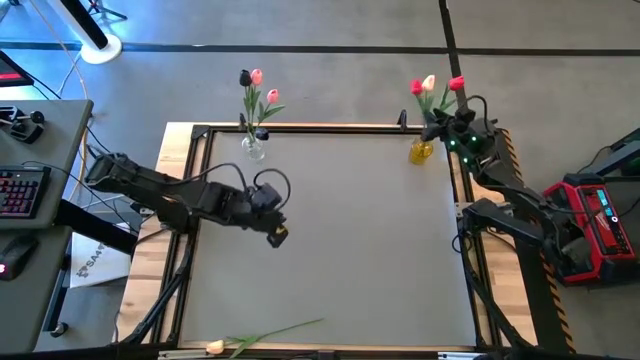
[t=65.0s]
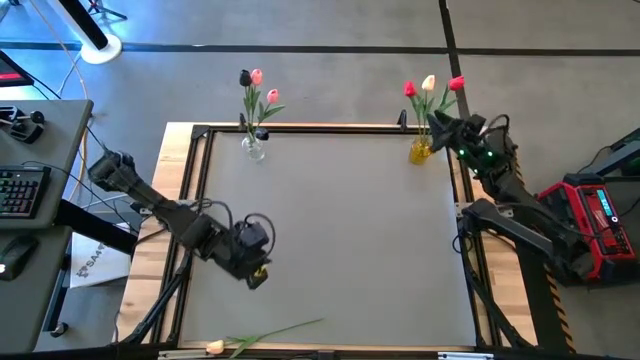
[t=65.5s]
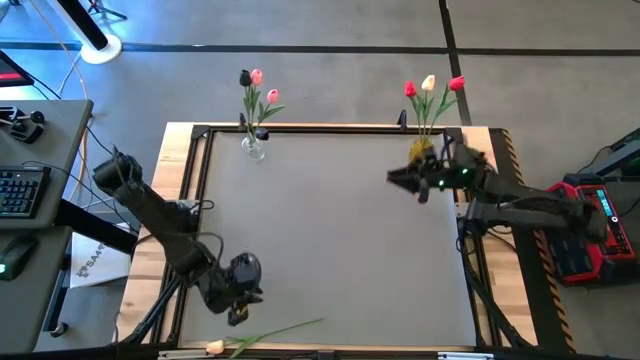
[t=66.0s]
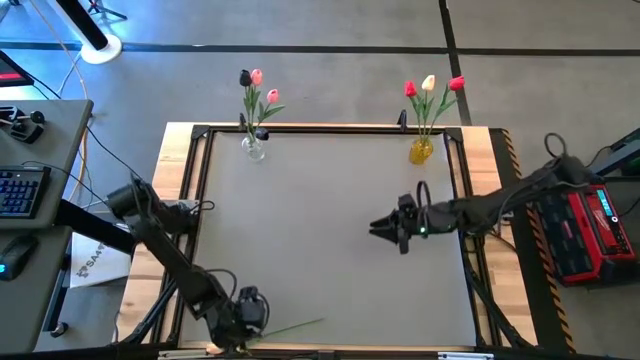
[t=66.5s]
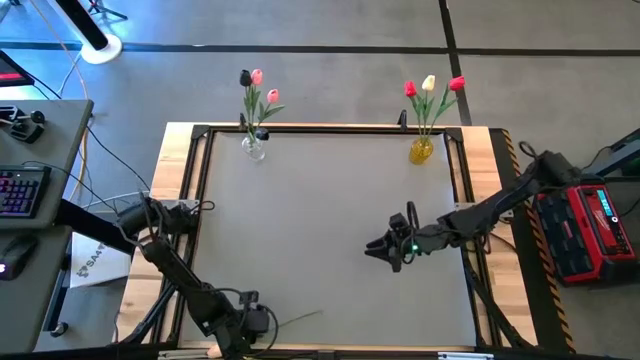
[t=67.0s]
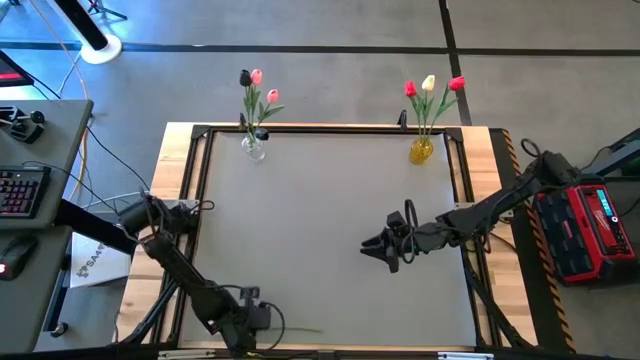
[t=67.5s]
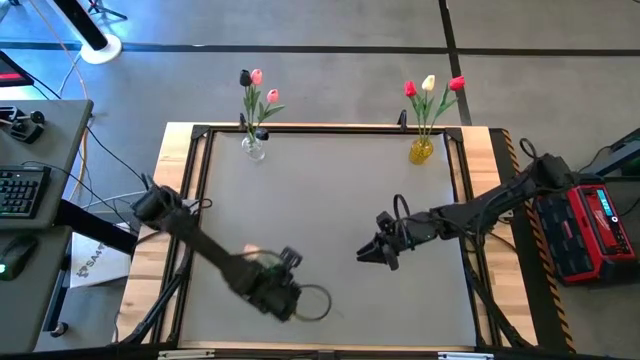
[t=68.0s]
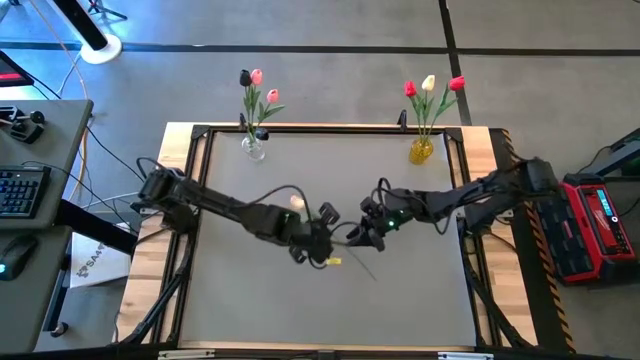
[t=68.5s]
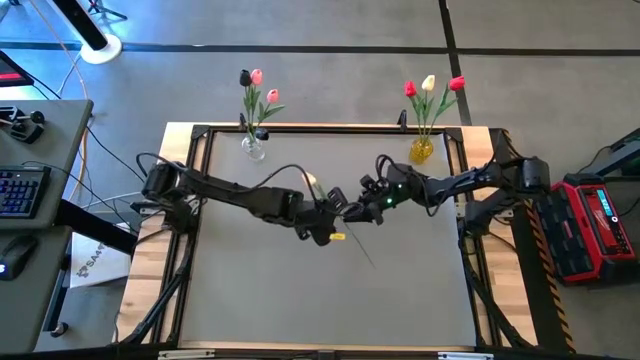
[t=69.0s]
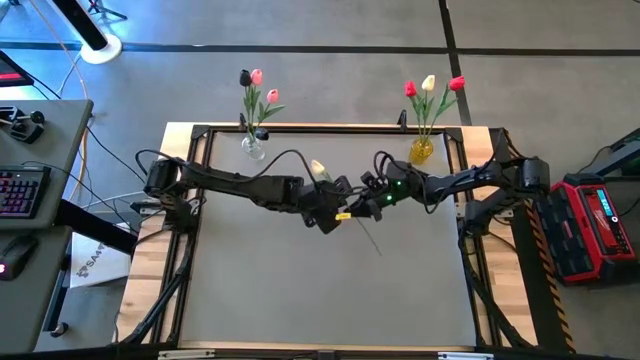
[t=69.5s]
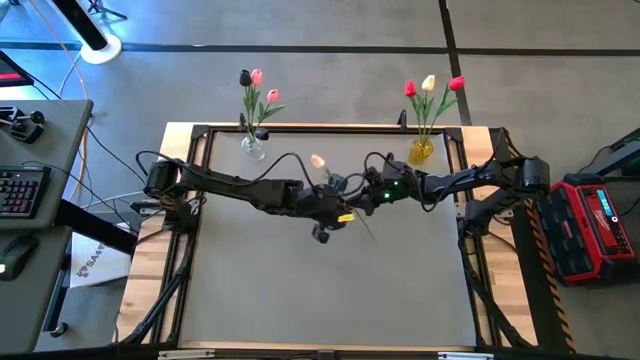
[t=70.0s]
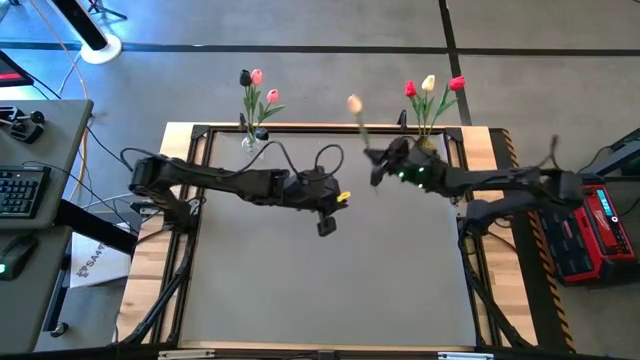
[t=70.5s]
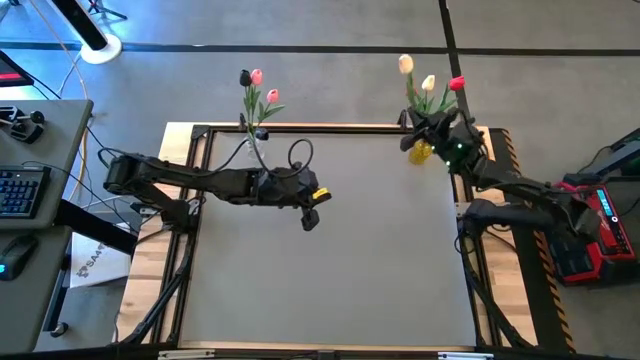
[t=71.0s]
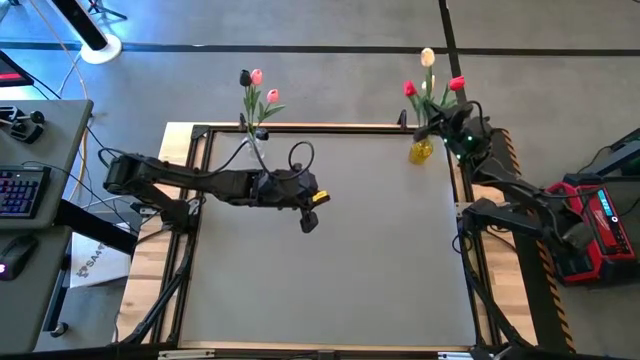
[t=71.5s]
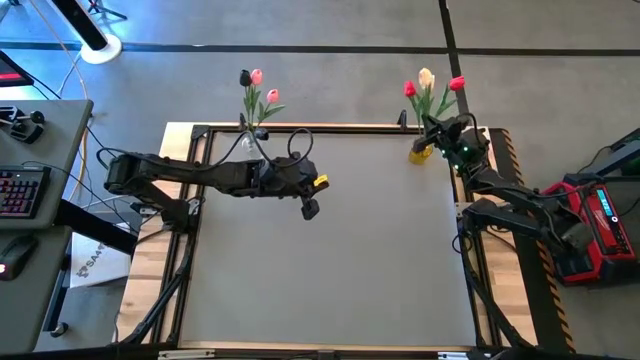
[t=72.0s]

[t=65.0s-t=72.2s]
Task: Sort flowers into vase by color
Put the light pink flower into the yellow vase

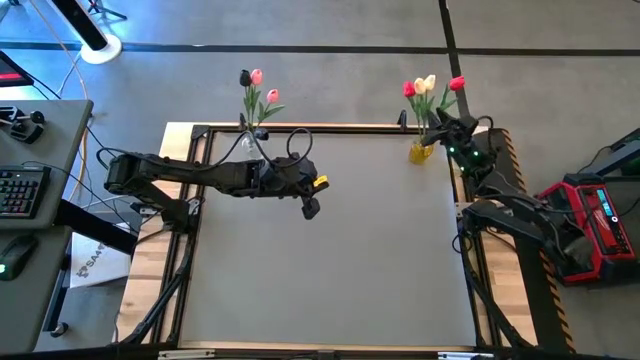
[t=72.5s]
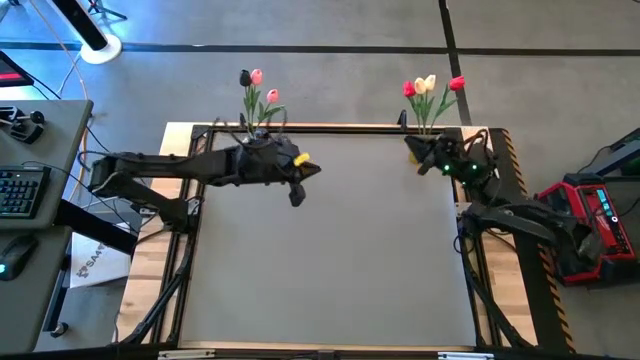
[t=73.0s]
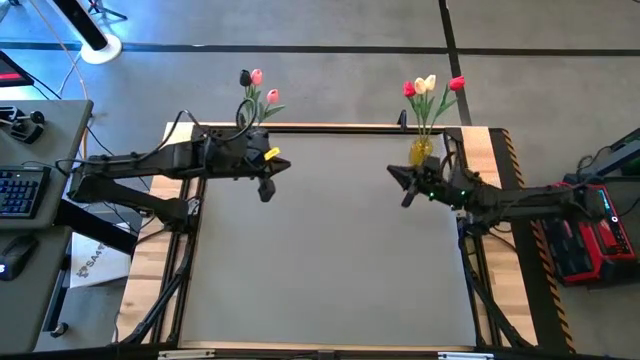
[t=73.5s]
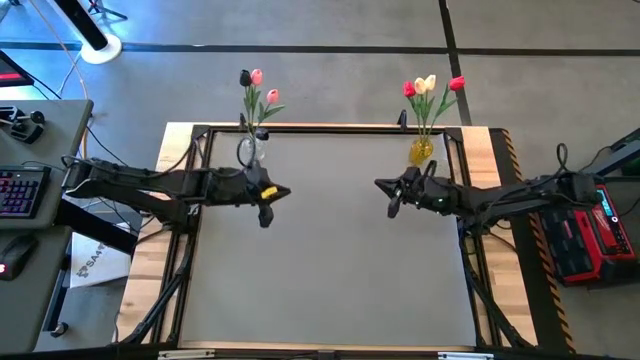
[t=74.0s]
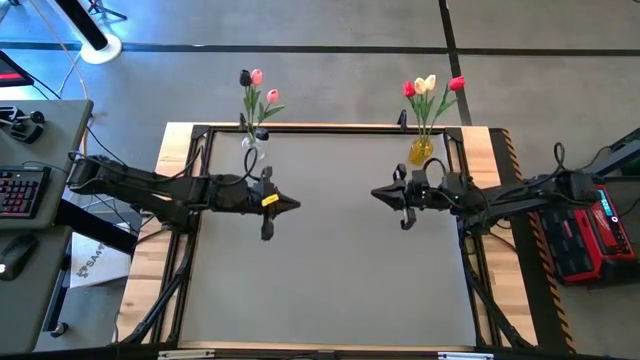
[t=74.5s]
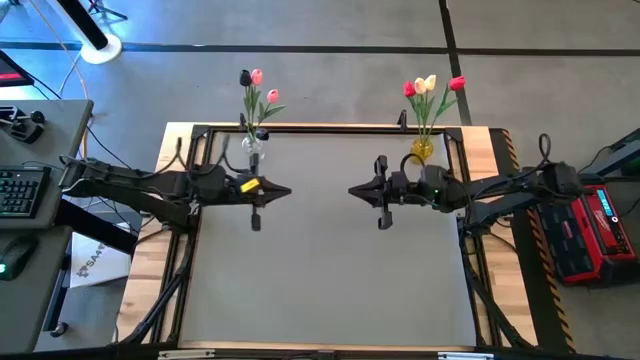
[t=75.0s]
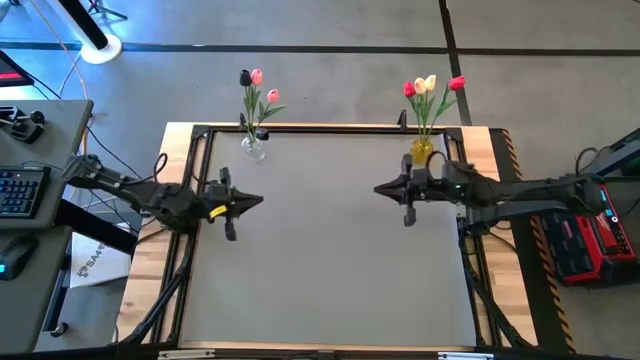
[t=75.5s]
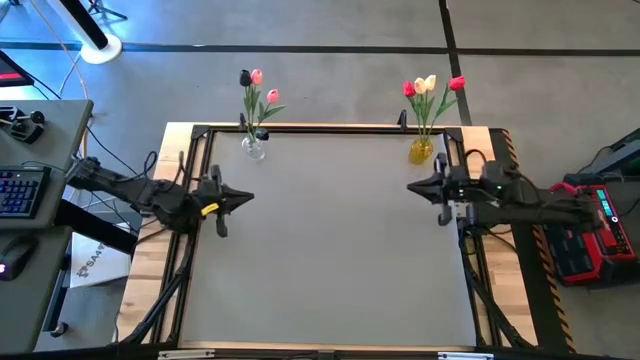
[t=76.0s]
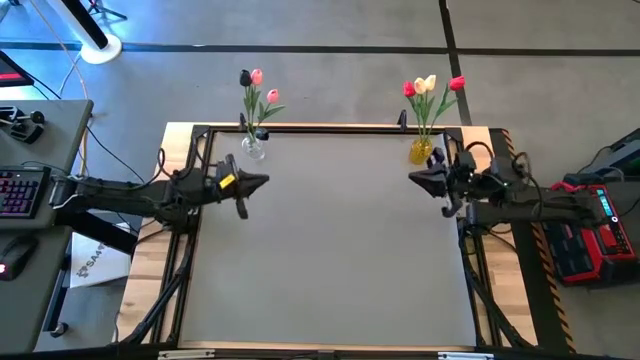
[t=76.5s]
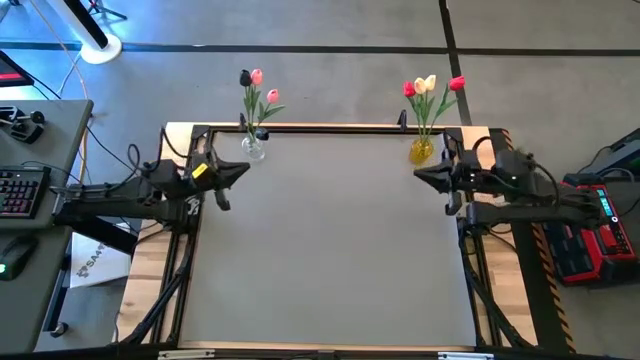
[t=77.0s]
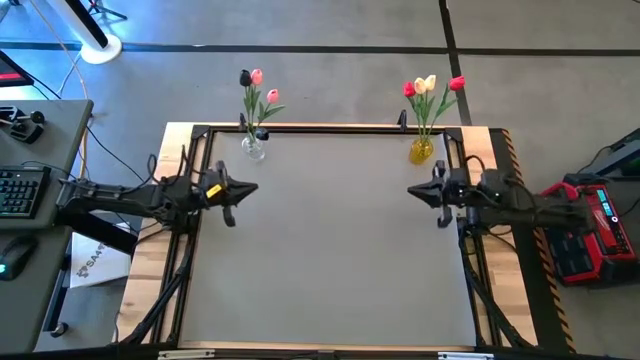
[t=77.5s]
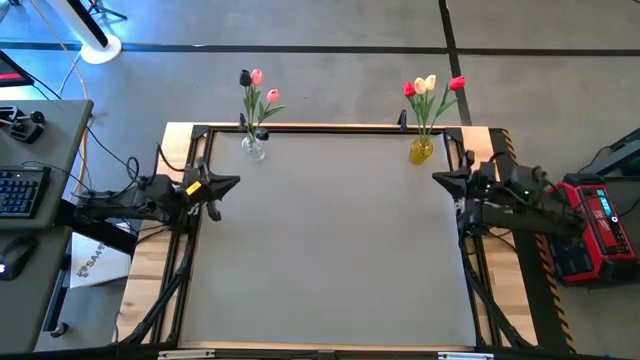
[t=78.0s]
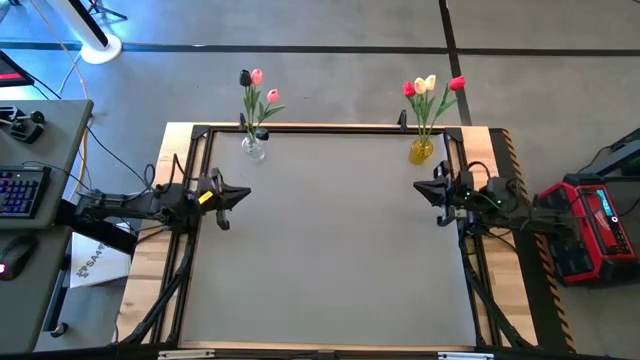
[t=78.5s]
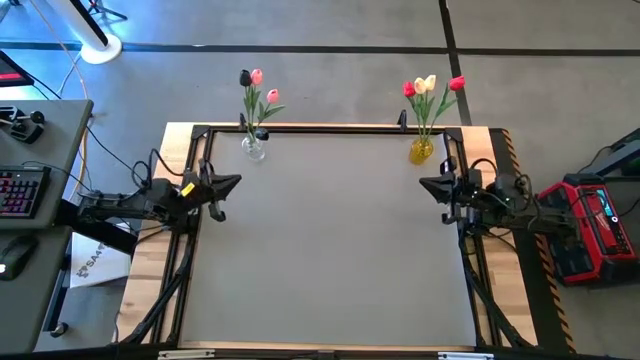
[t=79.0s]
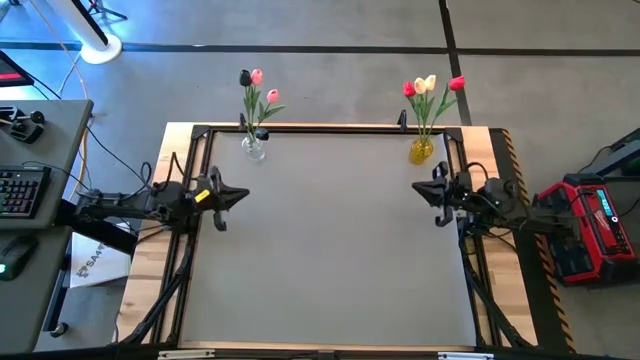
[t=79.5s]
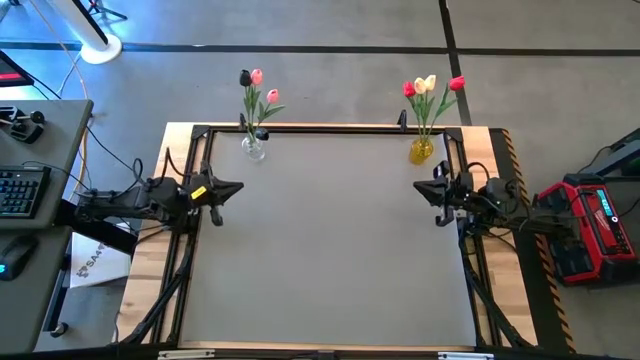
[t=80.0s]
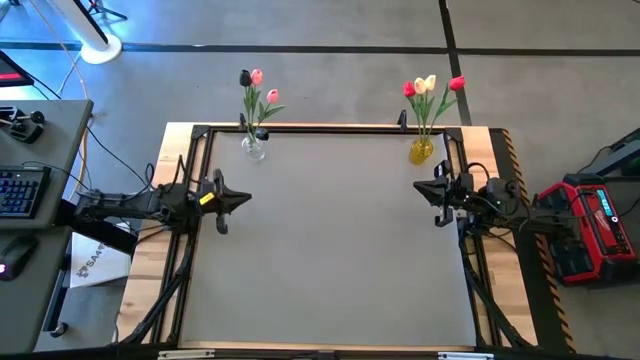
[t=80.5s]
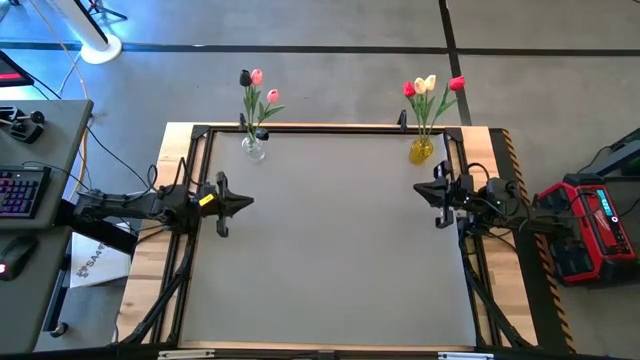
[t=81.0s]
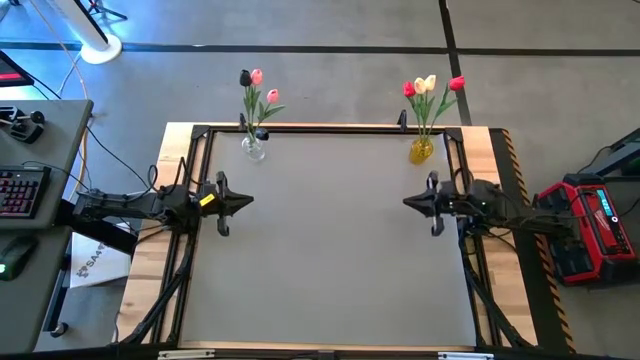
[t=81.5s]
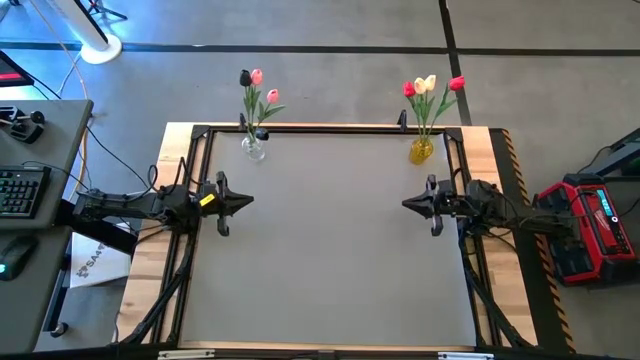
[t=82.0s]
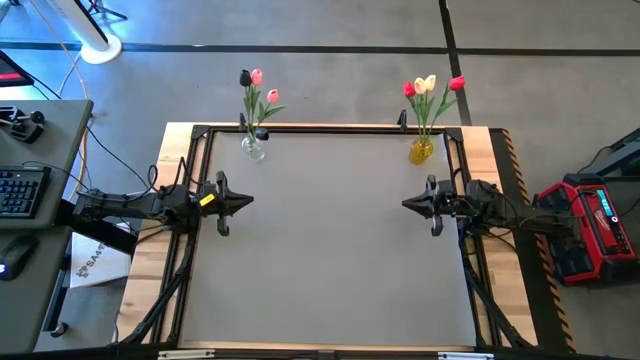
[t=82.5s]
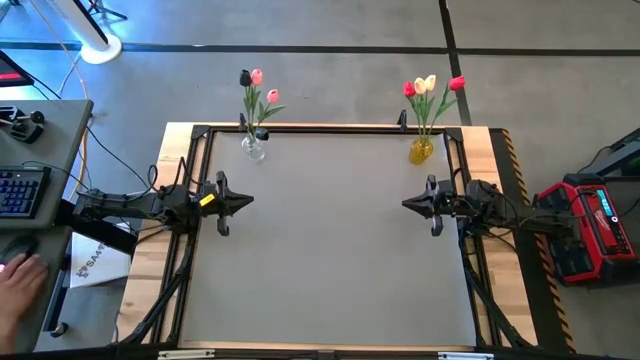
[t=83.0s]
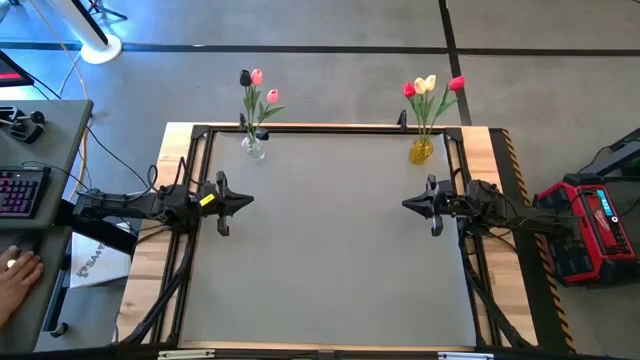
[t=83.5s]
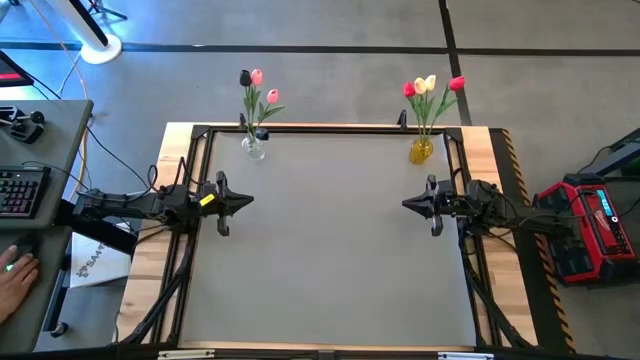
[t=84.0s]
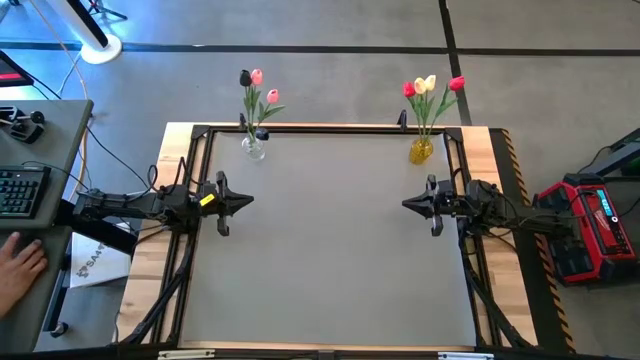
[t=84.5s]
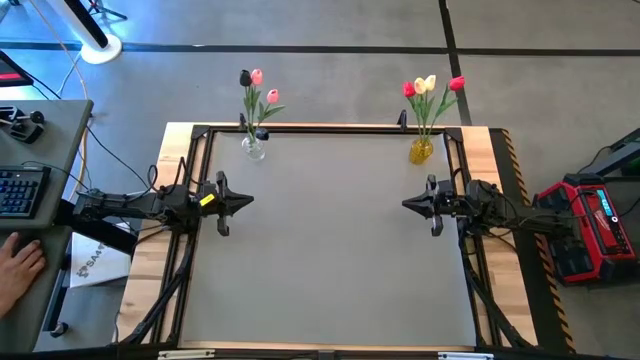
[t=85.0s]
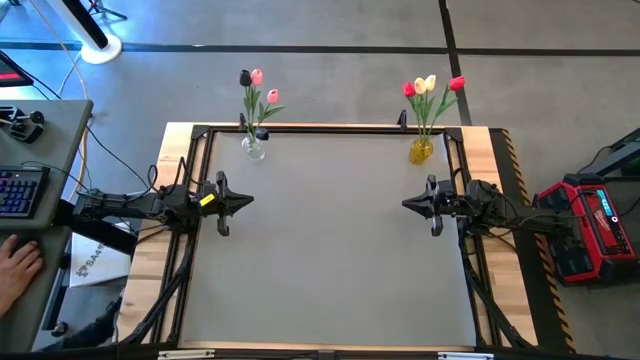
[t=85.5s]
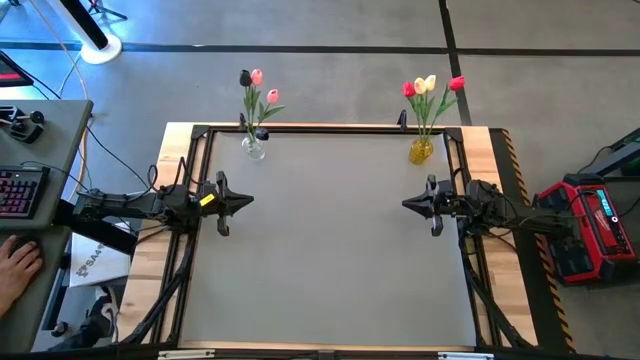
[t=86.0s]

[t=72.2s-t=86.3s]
Return to Home Position
